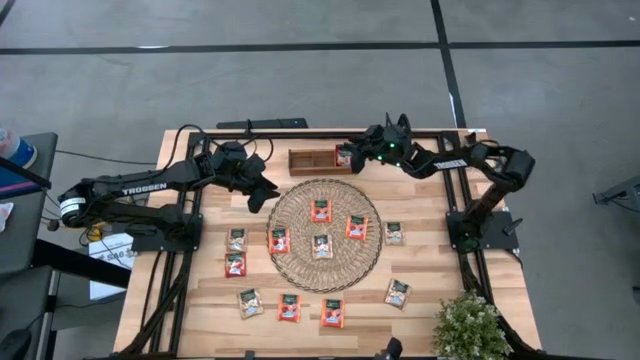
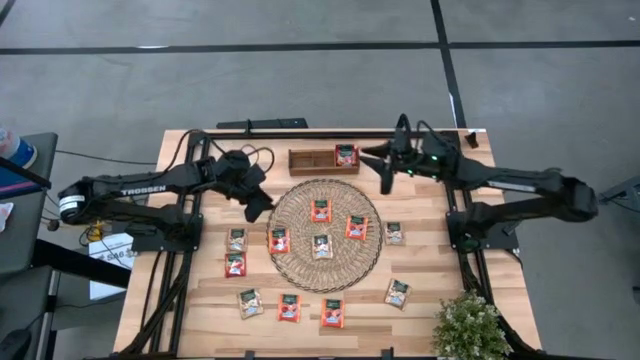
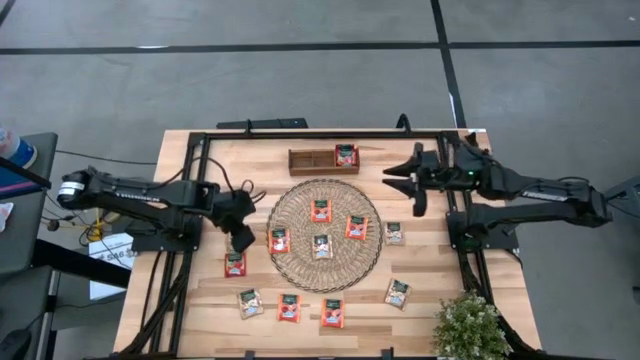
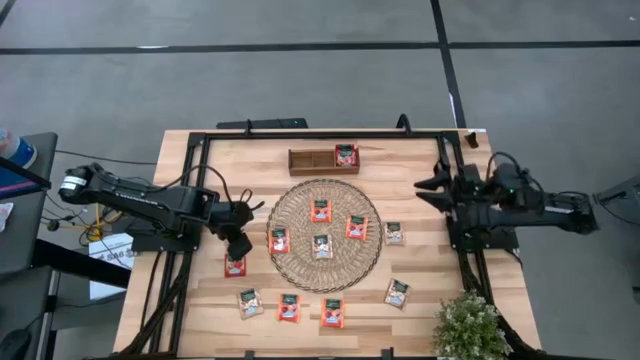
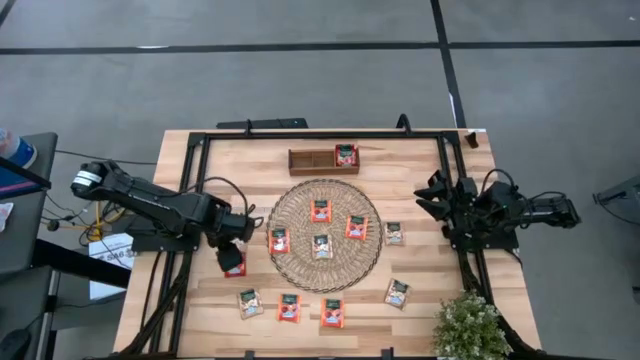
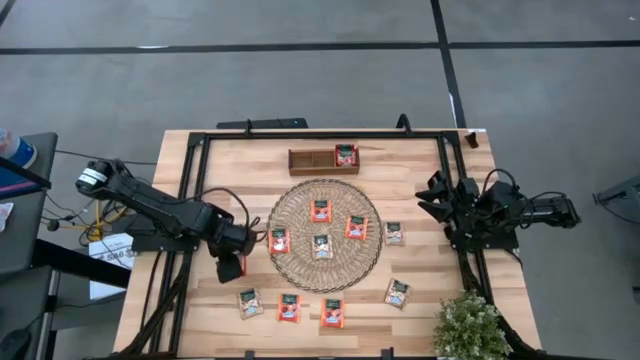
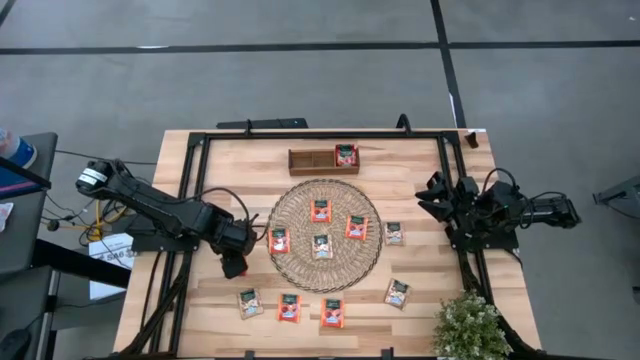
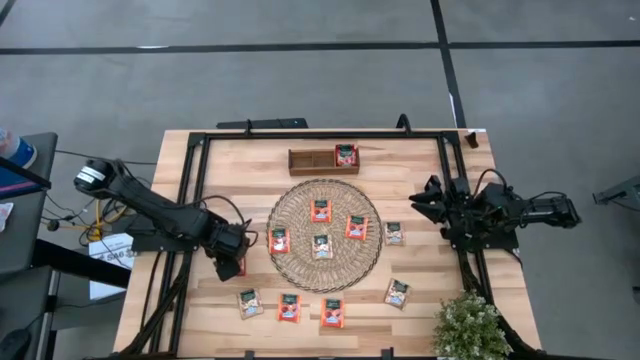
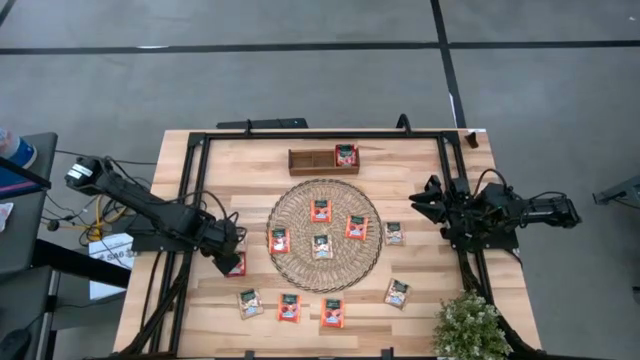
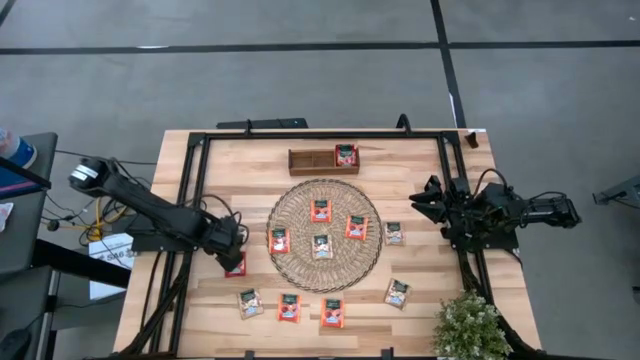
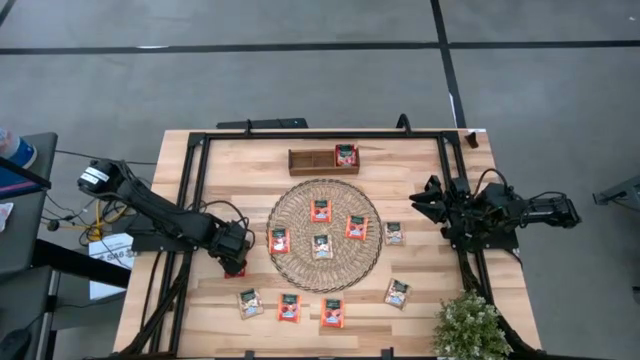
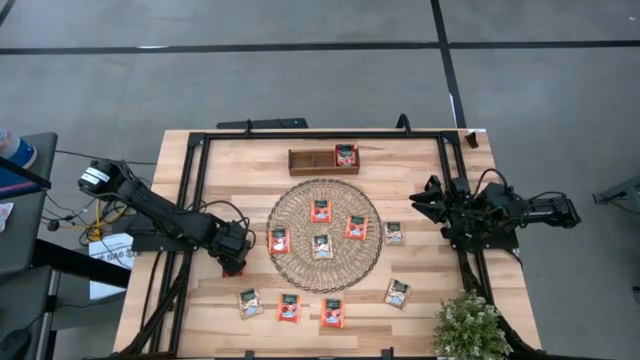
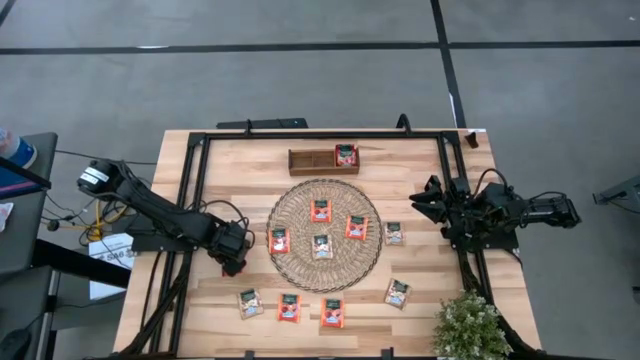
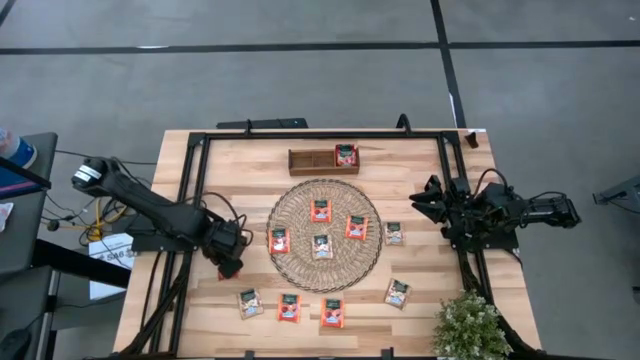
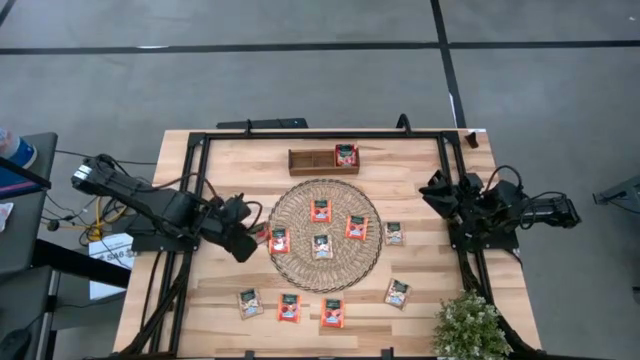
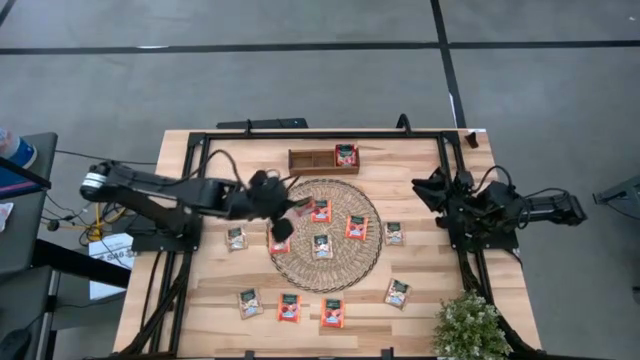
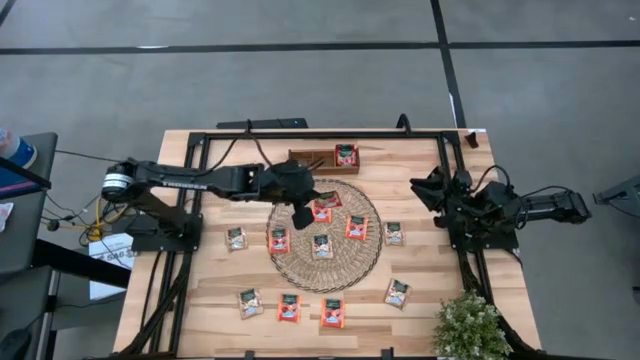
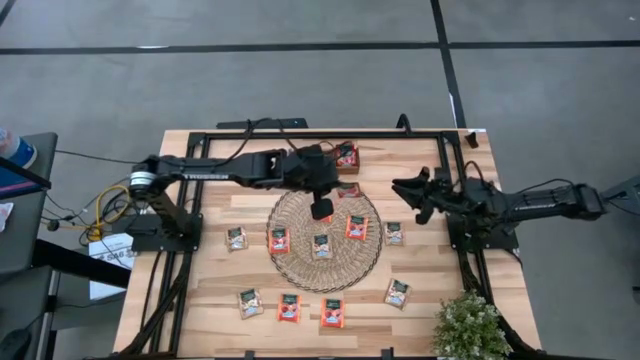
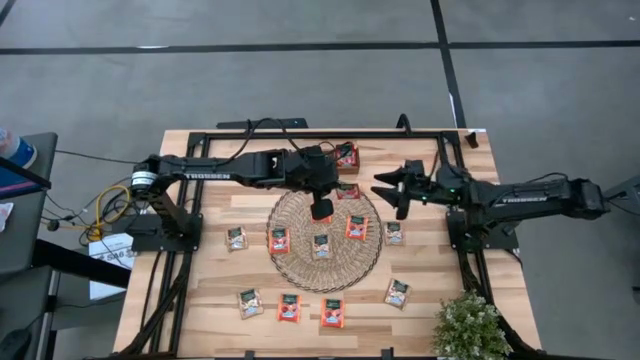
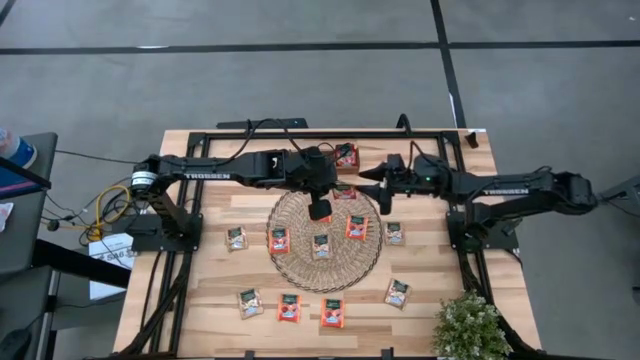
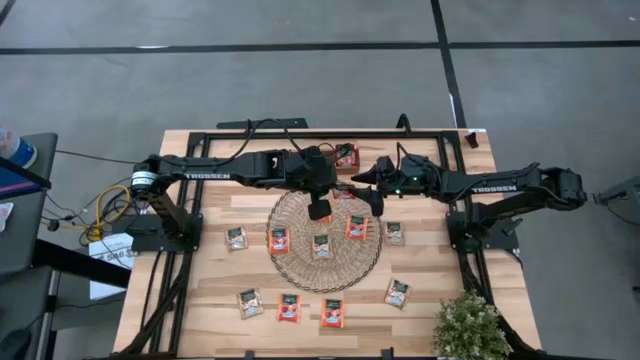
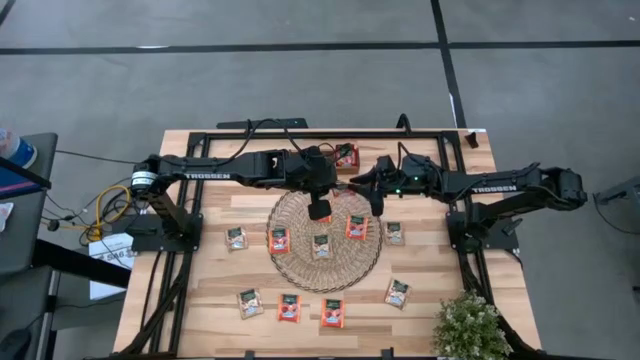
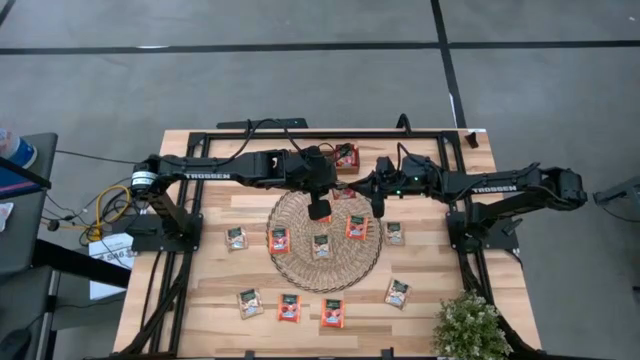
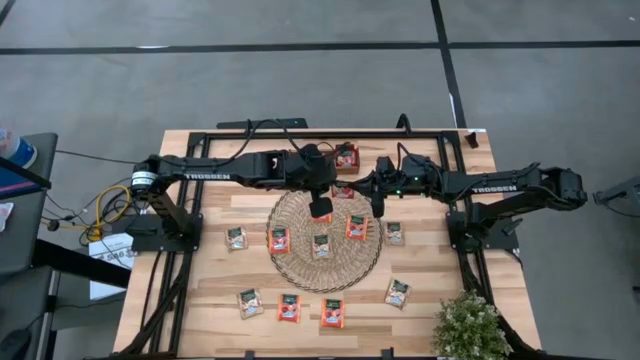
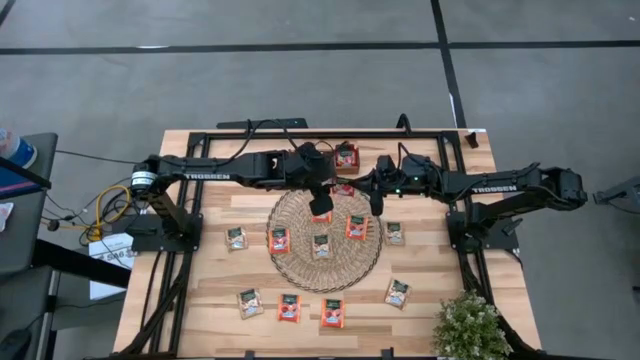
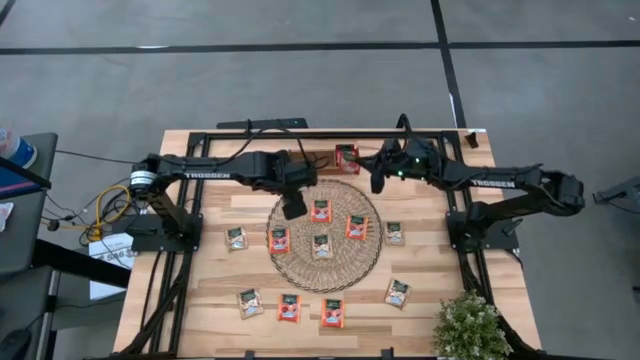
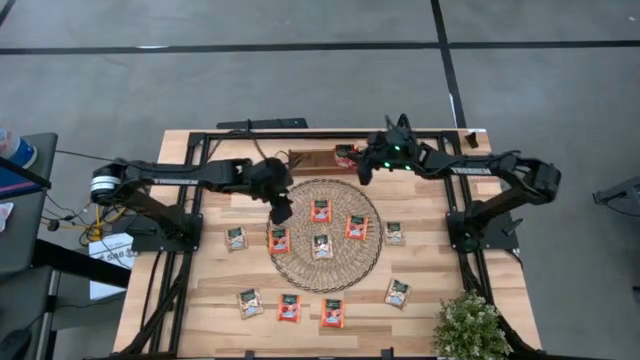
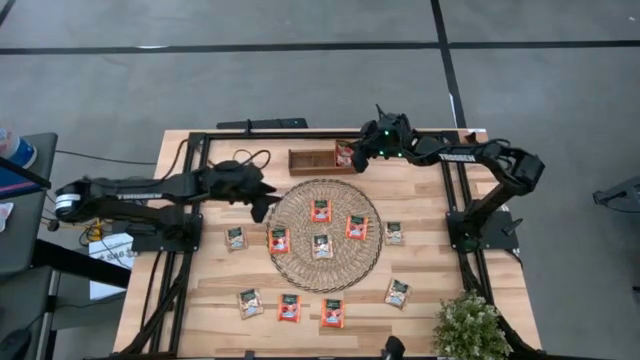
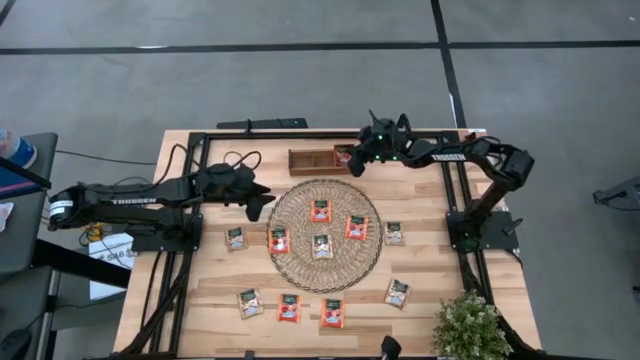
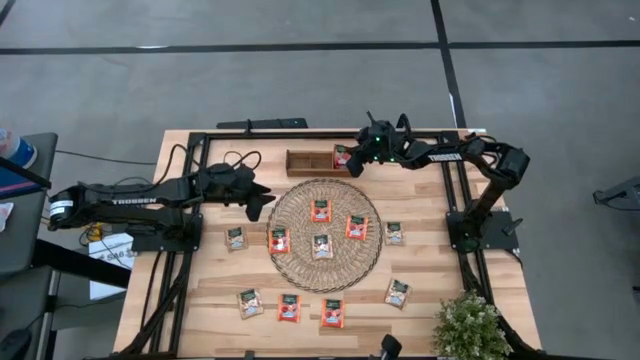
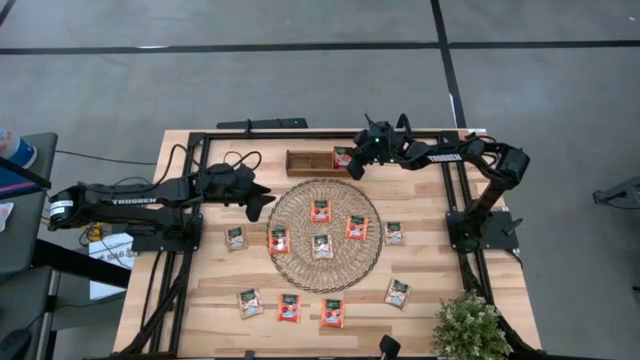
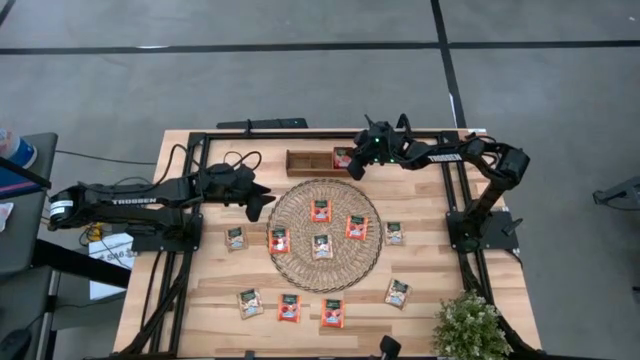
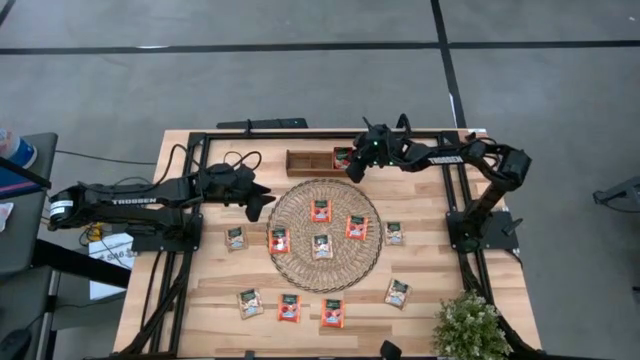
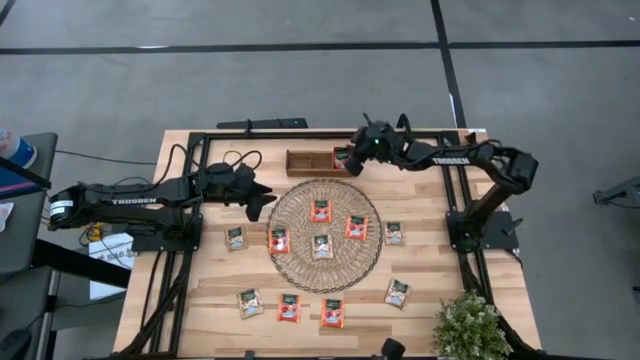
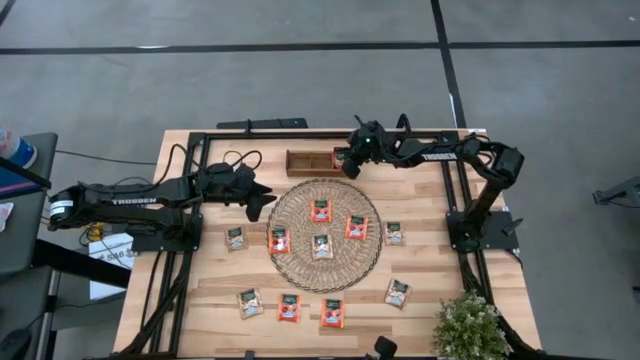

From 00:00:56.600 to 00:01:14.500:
Task: Pick & Place Tea
Put the red tea bag into the right section of the wooden organizer

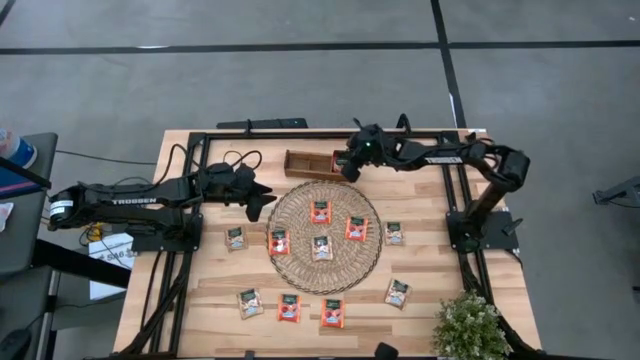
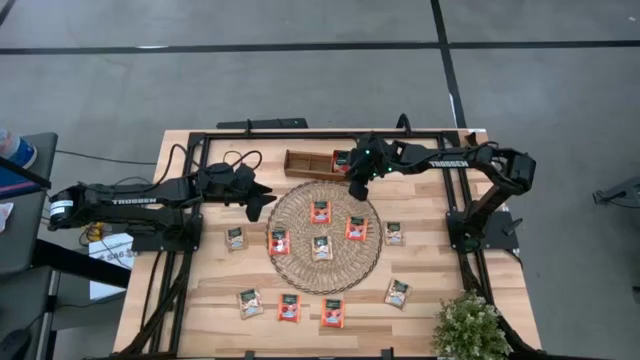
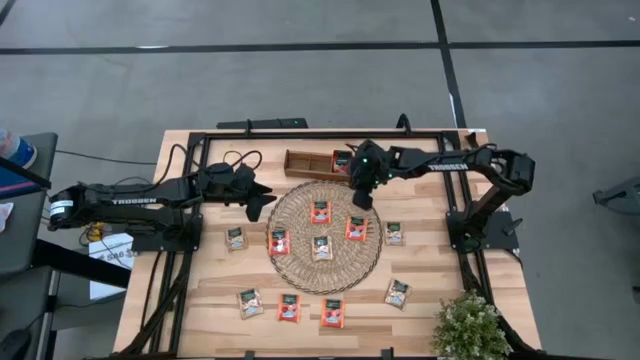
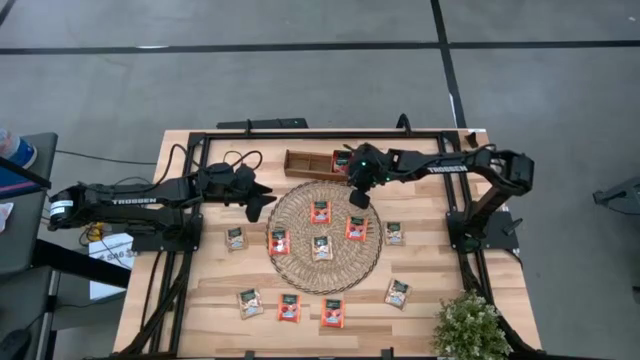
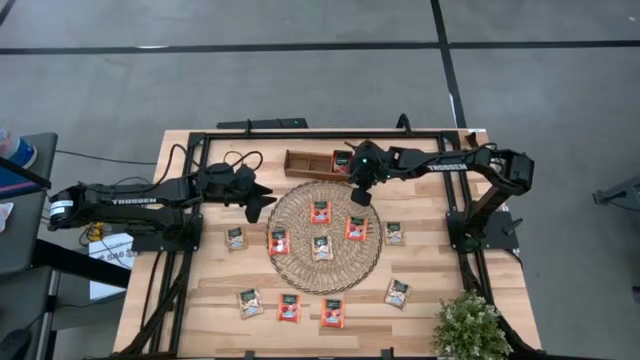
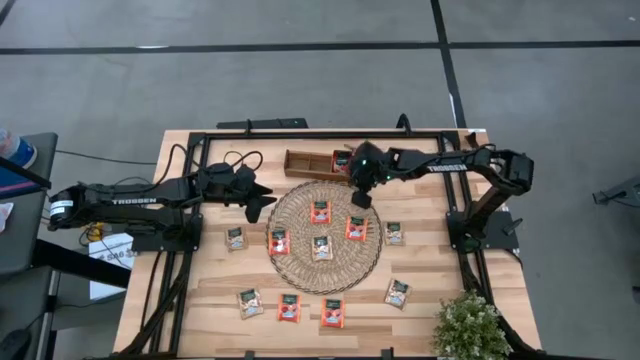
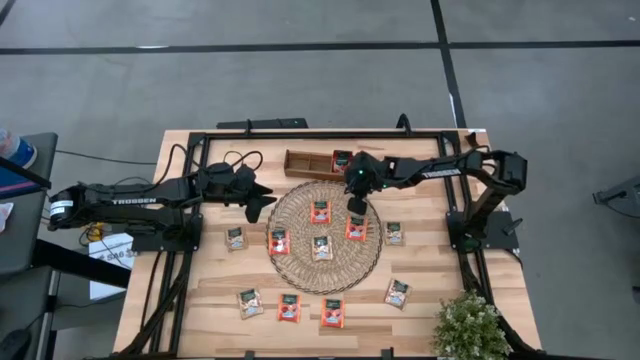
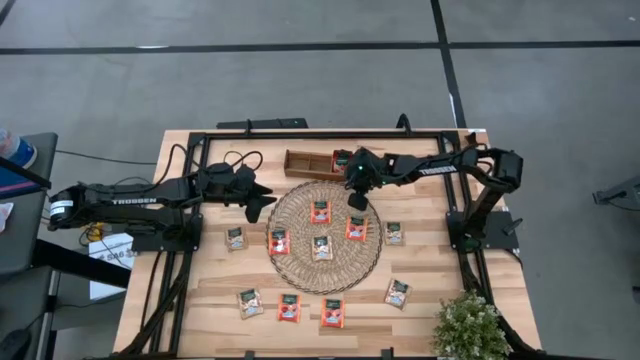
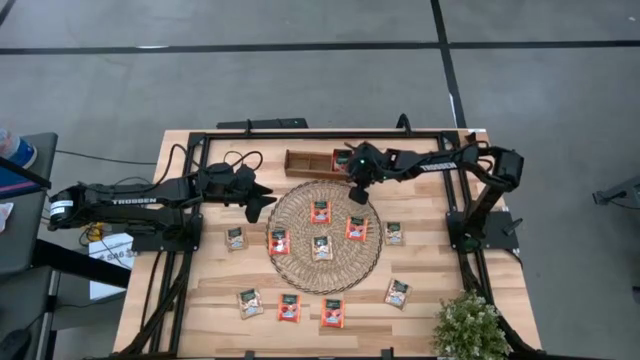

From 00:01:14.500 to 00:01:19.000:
Adjust the wooden organizer
